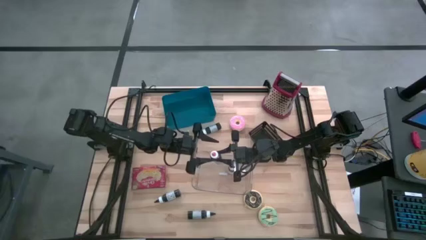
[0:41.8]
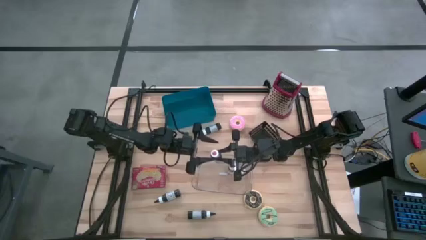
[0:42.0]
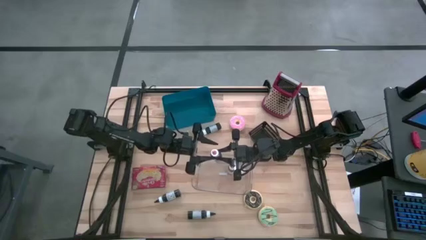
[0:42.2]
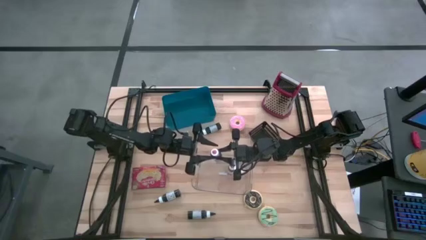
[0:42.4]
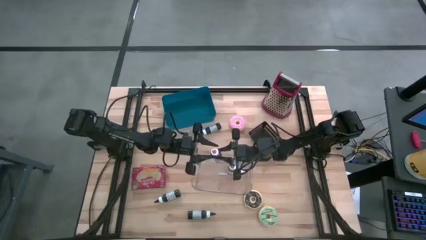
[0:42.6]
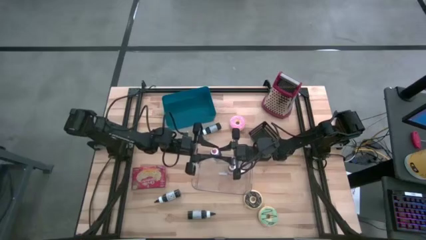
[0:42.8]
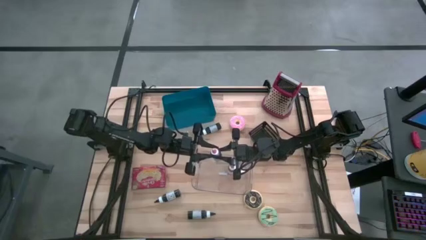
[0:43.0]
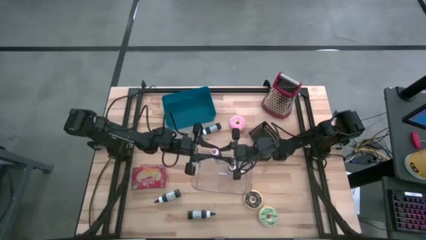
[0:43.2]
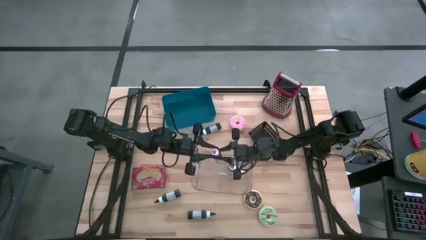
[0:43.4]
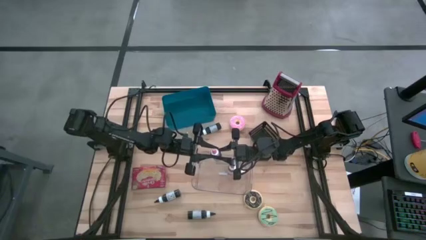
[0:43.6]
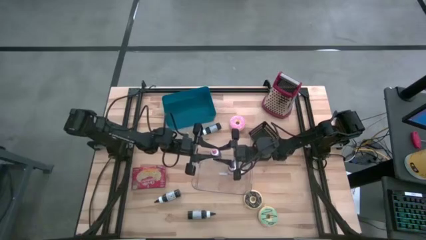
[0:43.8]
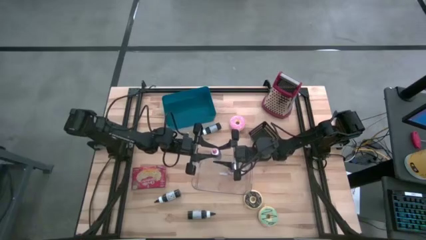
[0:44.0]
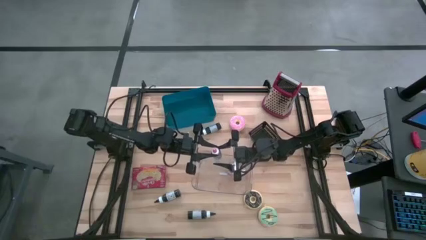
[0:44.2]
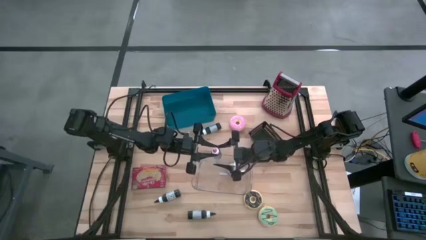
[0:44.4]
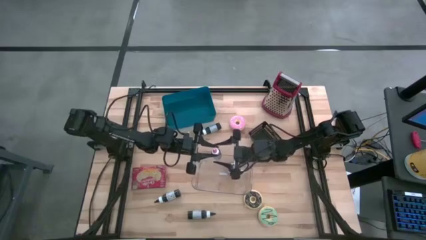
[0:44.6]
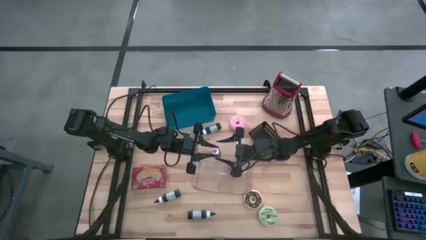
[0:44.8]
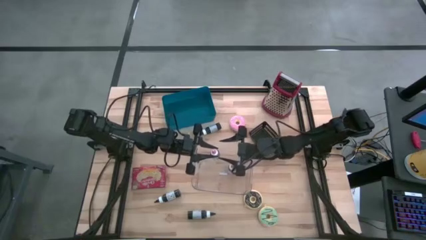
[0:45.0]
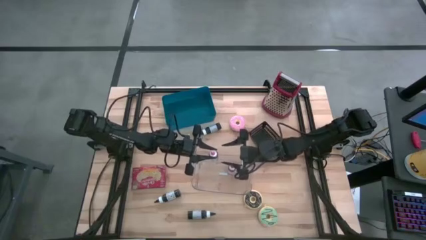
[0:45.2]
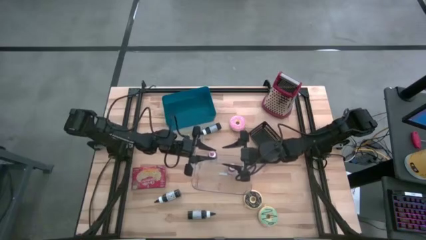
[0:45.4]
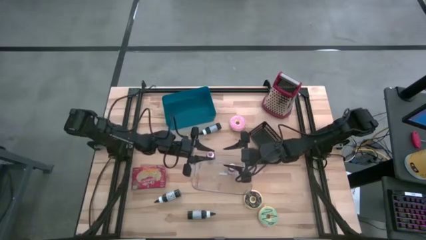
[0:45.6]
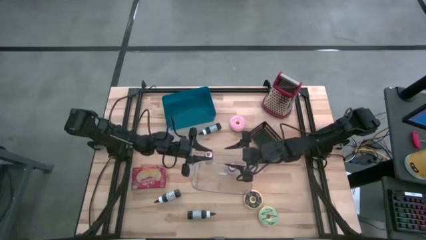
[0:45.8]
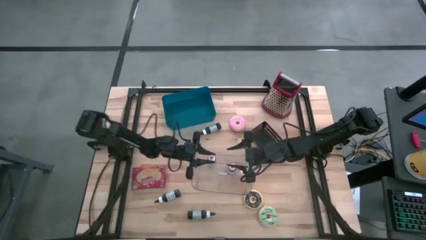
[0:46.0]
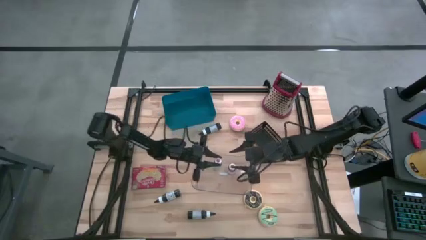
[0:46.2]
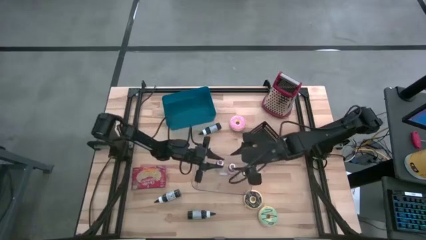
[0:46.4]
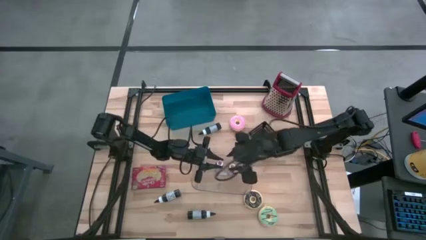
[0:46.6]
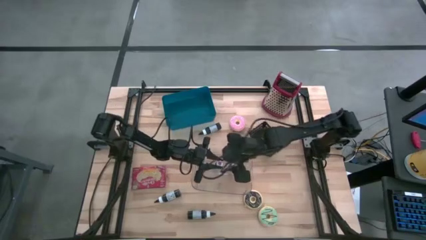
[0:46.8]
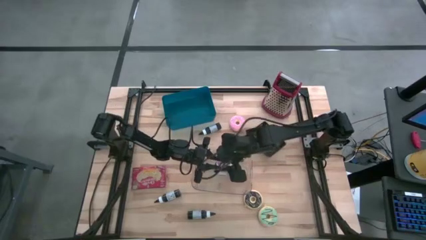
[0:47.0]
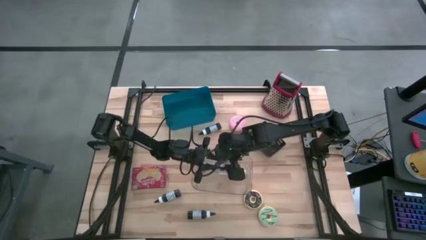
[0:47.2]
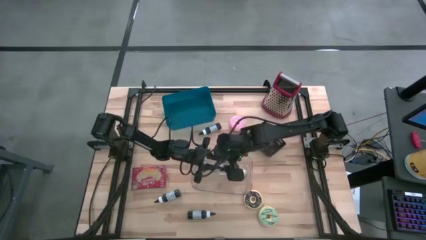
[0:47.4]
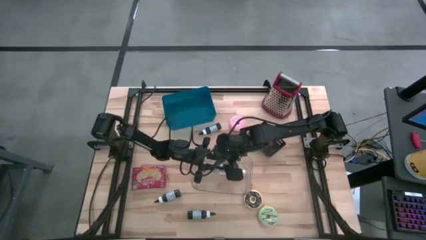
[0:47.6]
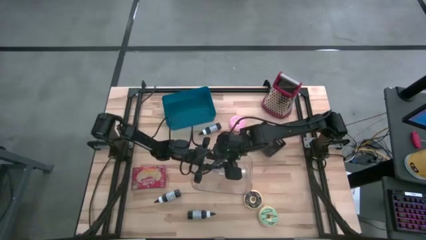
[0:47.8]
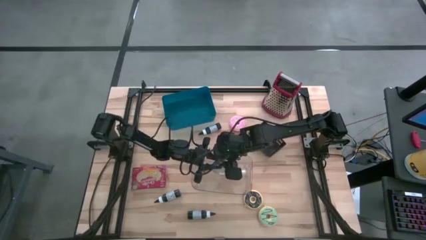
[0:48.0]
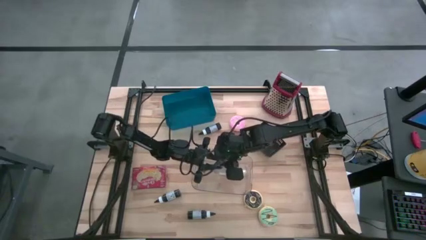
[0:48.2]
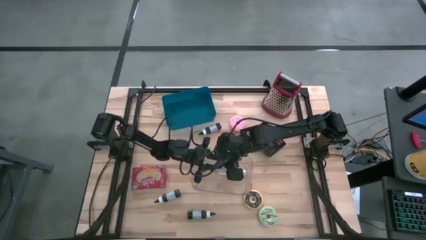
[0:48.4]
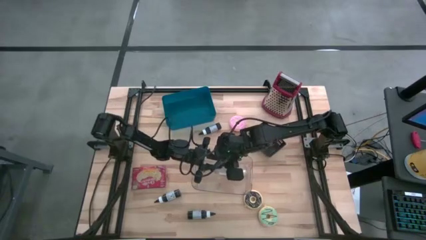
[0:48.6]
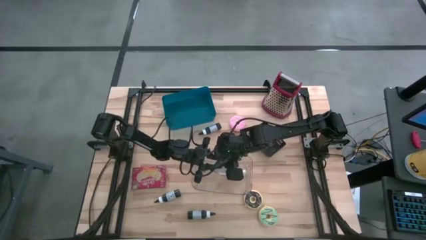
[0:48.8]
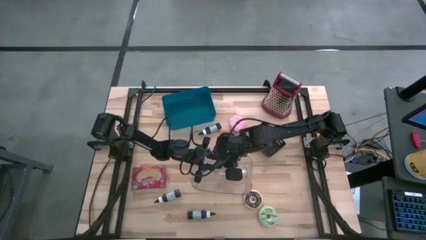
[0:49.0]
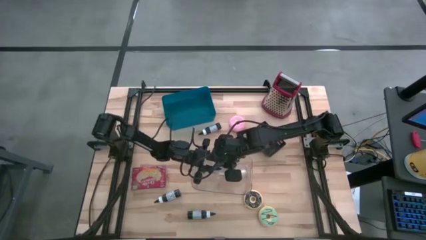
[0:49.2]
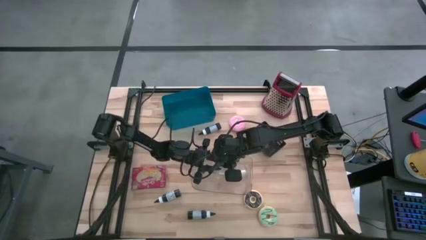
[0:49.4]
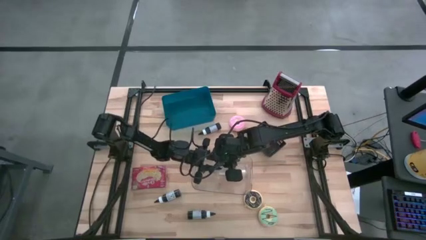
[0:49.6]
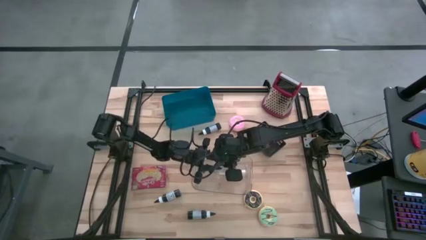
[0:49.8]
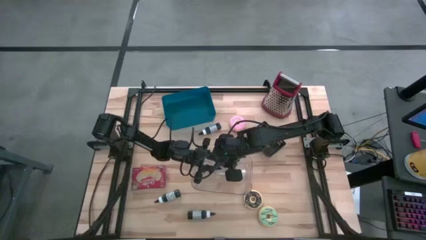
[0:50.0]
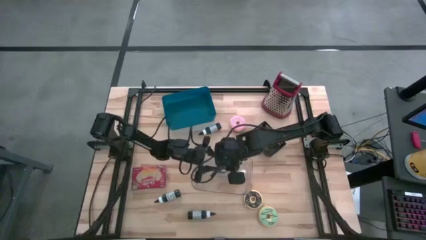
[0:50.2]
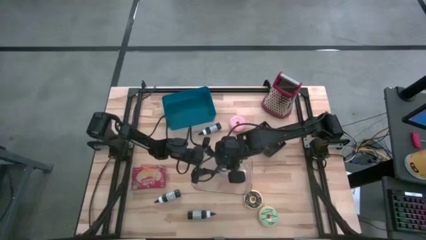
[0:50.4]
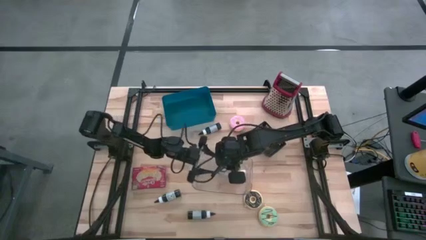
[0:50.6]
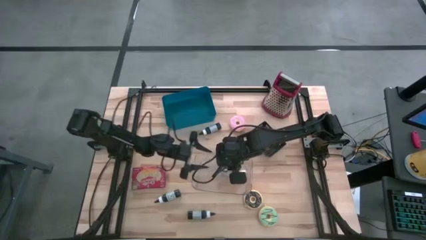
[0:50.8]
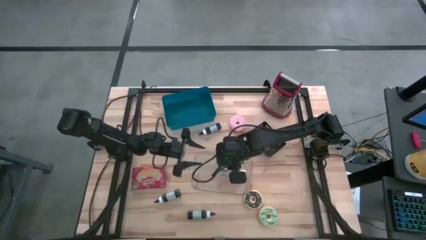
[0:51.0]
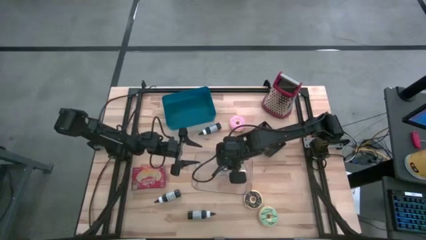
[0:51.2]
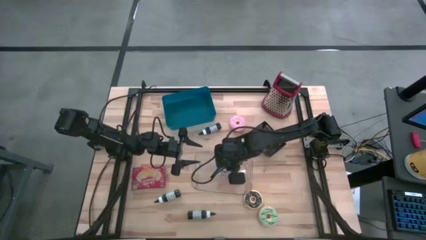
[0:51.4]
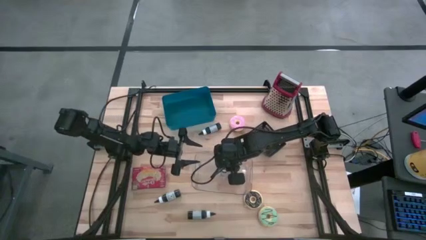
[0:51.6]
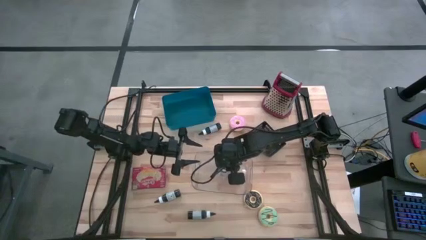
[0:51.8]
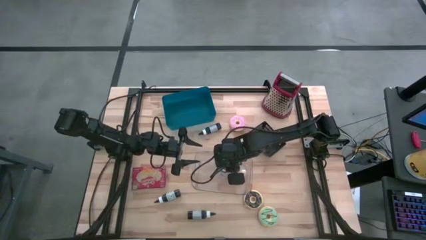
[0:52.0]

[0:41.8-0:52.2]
Put the pink food coloring bottle into the transparent bin
